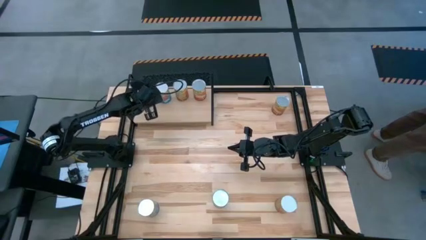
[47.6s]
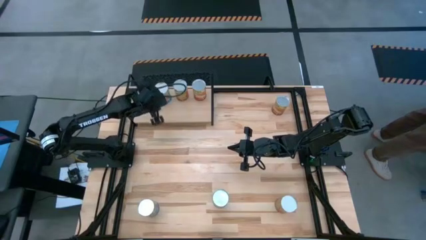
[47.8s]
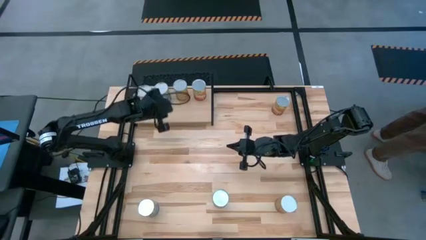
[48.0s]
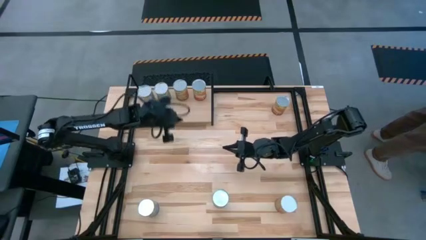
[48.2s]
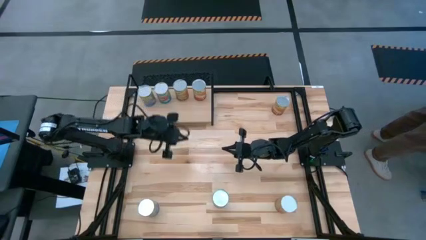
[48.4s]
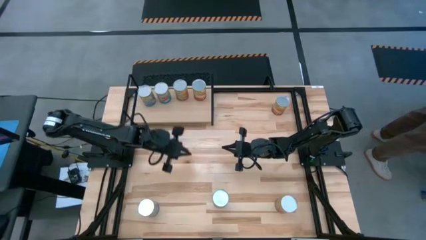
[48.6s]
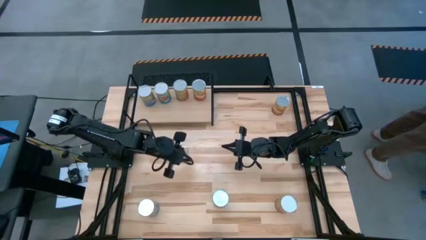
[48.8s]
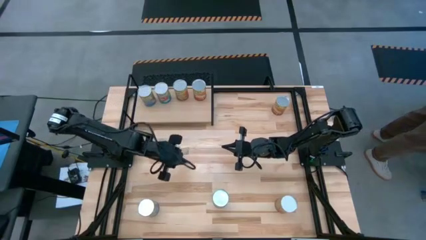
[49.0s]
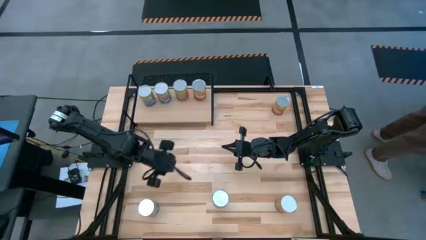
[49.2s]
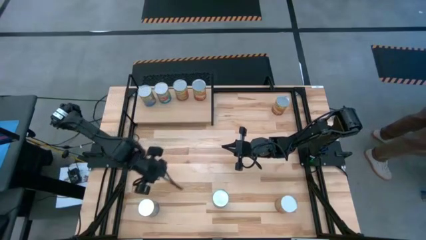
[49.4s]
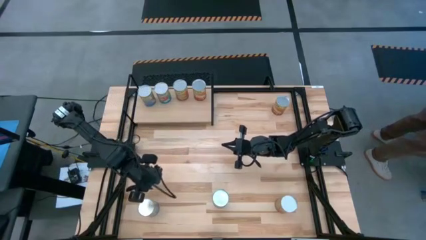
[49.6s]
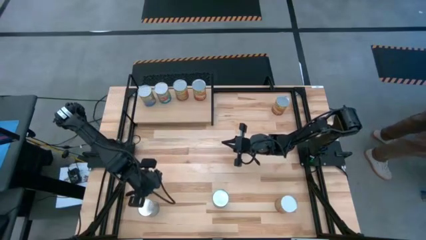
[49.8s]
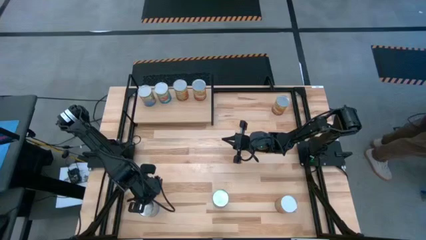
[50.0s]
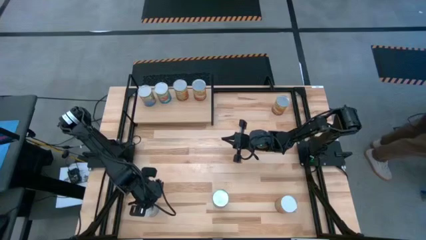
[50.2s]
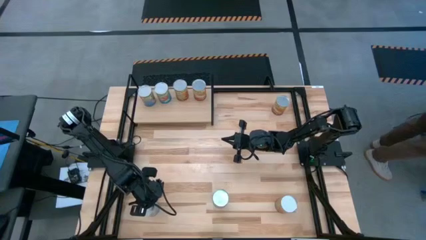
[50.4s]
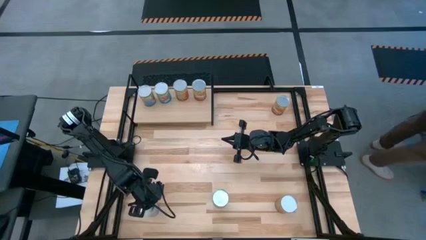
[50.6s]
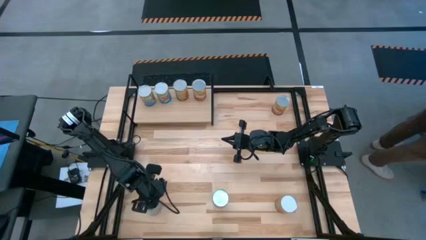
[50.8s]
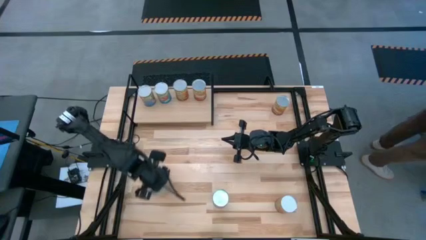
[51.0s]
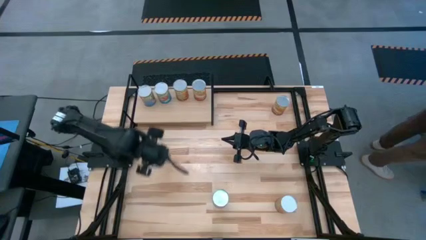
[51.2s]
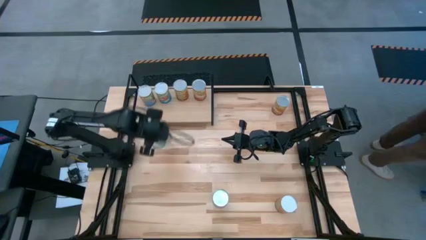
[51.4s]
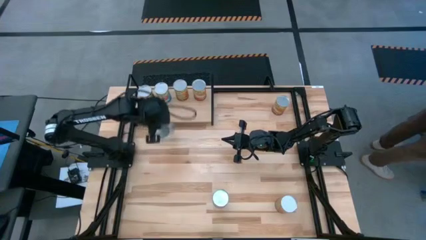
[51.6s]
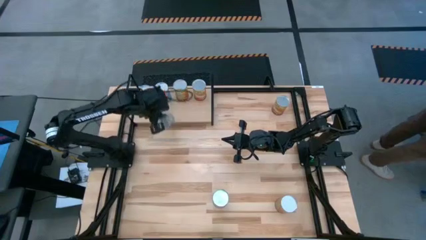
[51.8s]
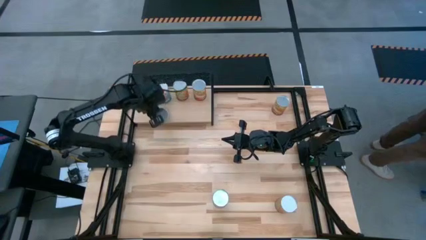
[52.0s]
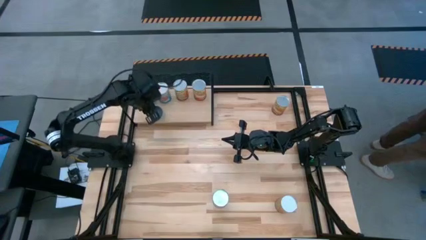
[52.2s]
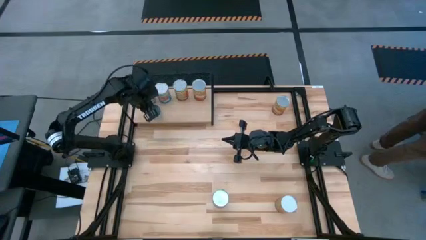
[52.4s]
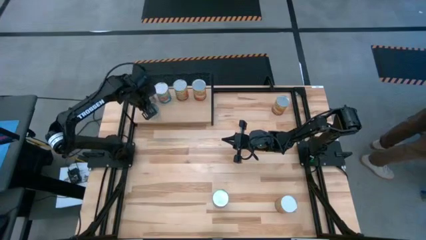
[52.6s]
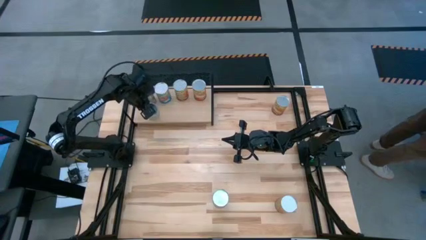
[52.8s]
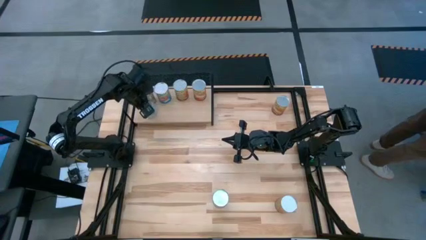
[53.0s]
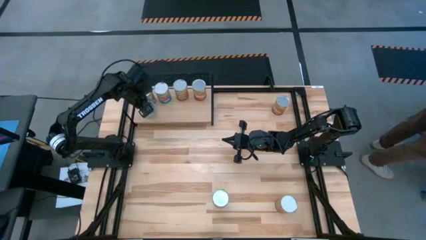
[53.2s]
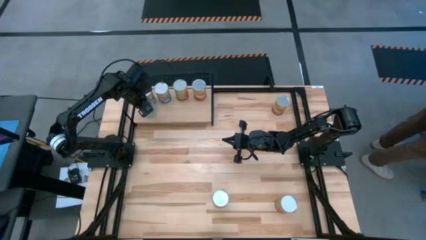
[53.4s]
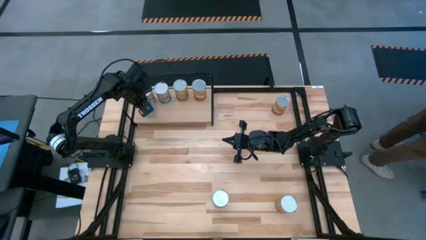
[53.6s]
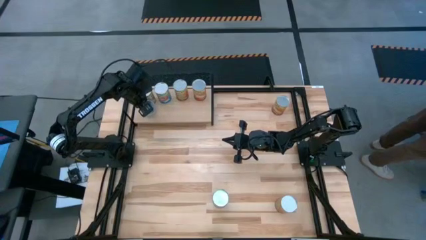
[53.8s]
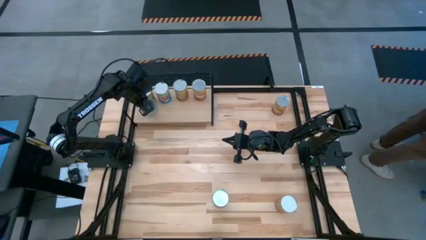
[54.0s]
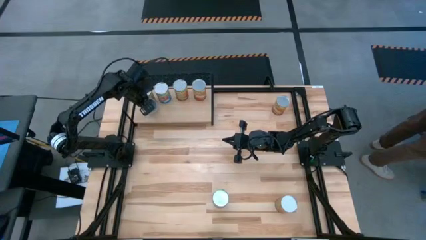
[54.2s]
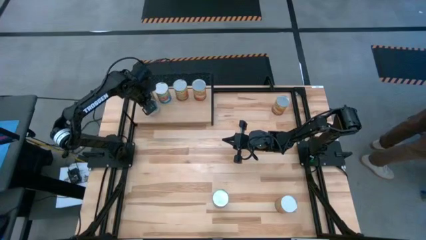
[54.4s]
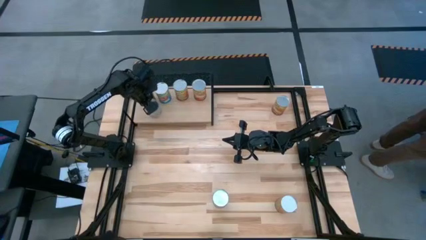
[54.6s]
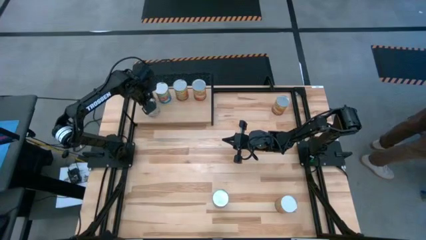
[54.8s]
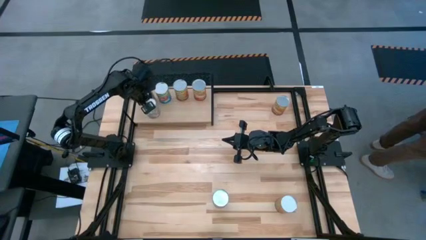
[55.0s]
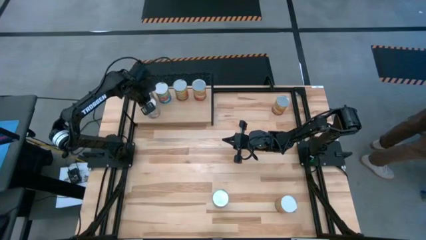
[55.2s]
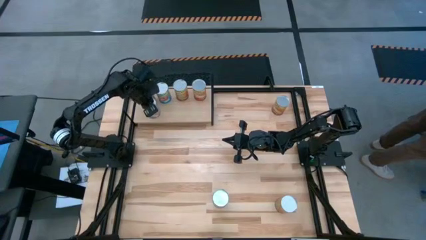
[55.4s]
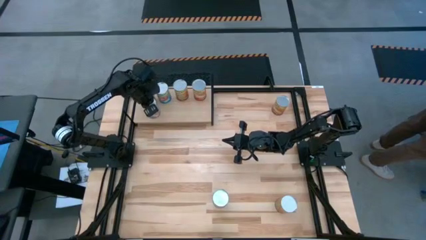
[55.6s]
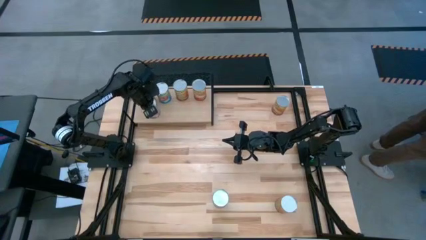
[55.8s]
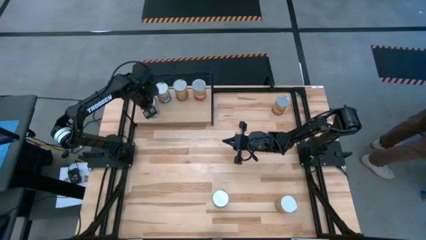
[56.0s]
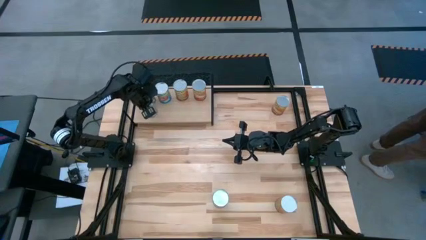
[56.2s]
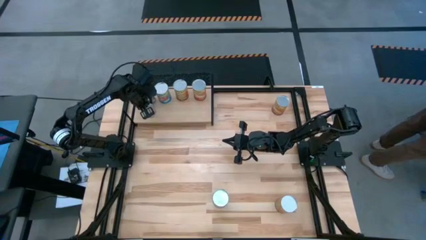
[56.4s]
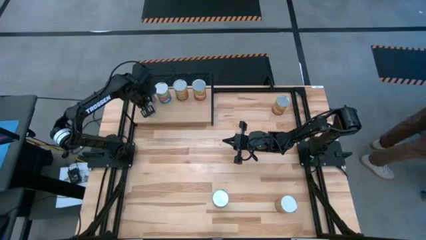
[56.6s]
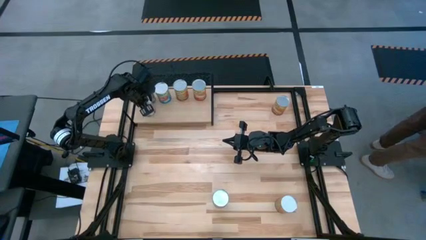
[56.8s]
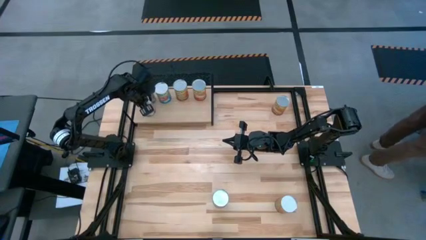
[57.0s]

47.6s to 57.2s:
Task: Pick and place cans onto a shelf
Put the canned peaches on the shelf aligned with the other canned peaches on the shelf

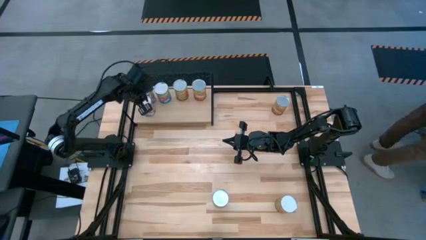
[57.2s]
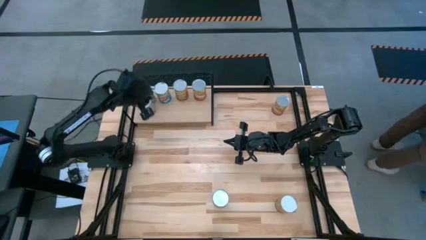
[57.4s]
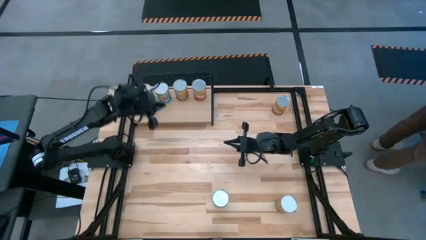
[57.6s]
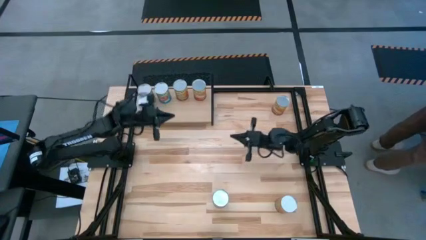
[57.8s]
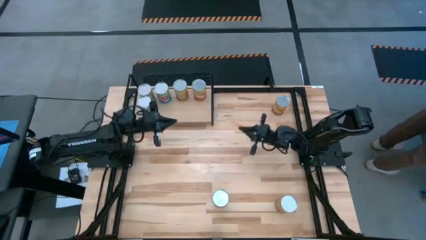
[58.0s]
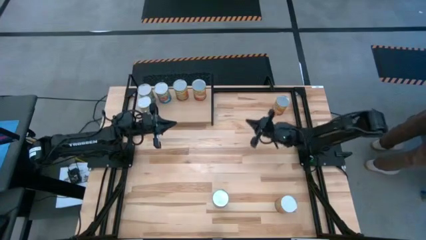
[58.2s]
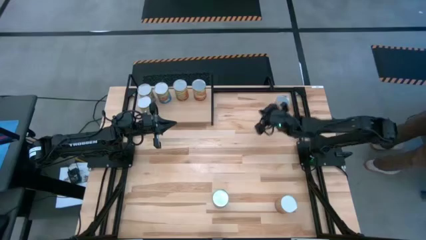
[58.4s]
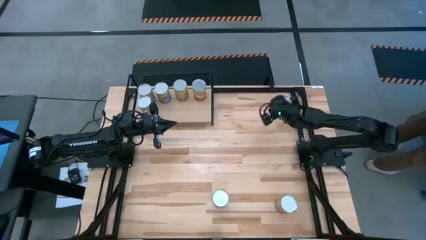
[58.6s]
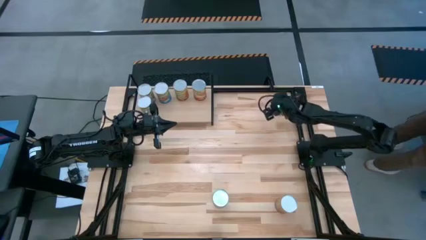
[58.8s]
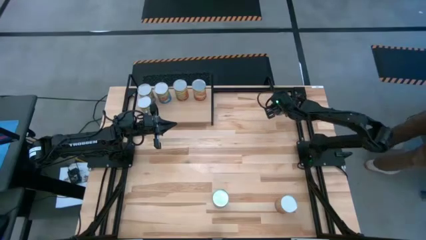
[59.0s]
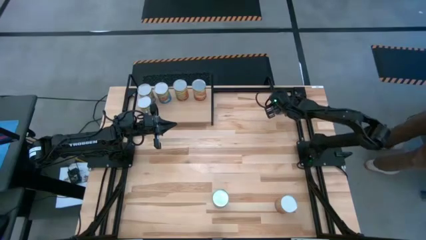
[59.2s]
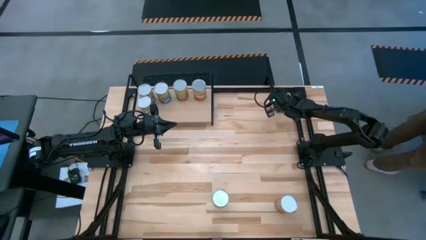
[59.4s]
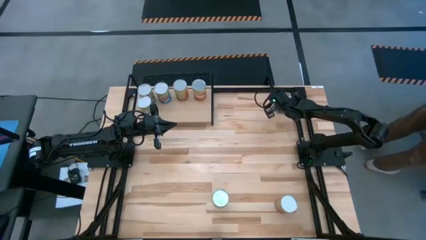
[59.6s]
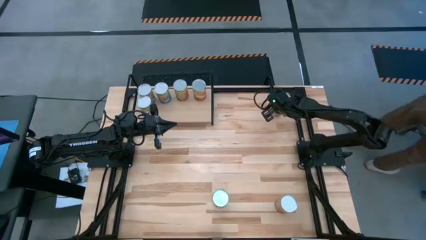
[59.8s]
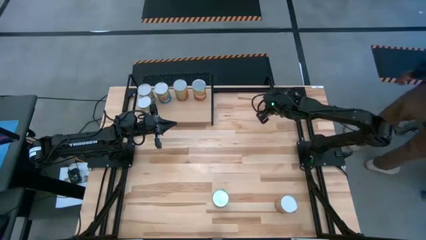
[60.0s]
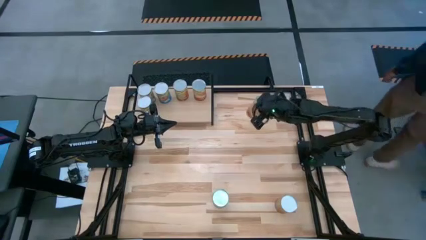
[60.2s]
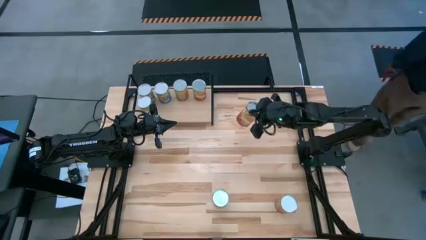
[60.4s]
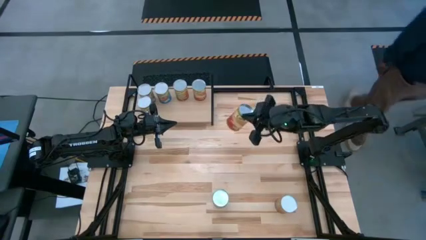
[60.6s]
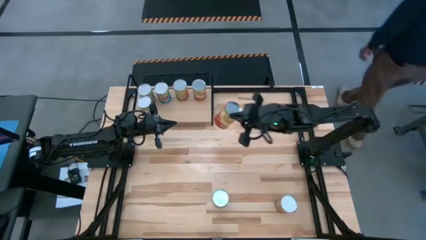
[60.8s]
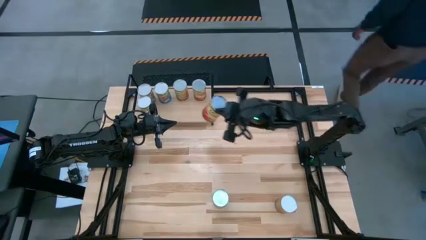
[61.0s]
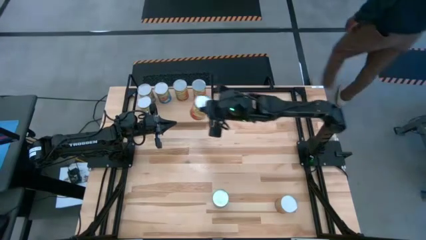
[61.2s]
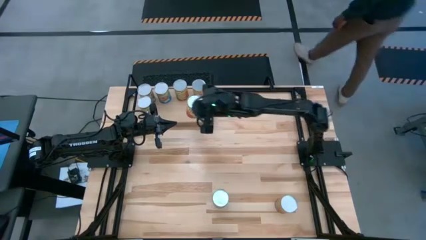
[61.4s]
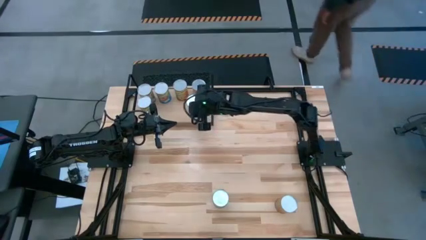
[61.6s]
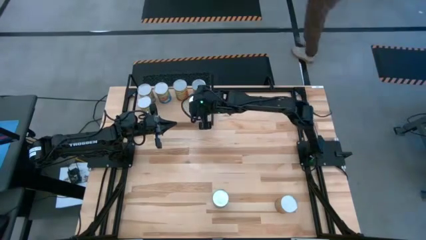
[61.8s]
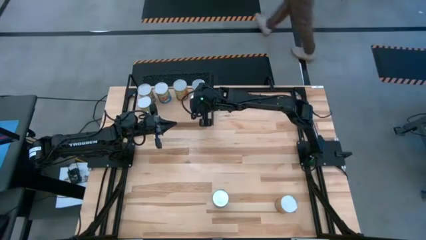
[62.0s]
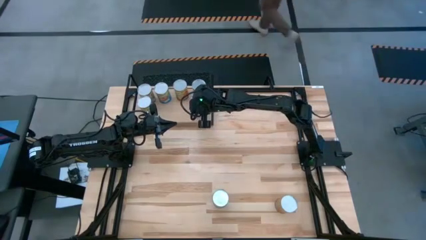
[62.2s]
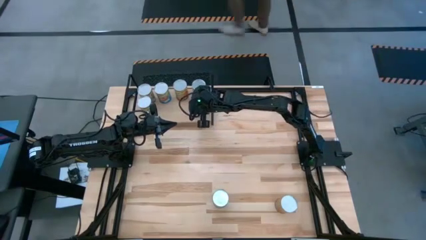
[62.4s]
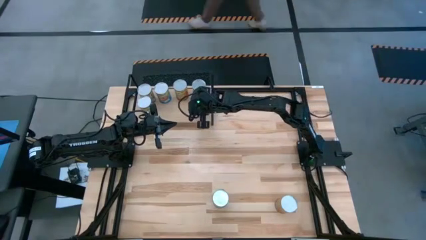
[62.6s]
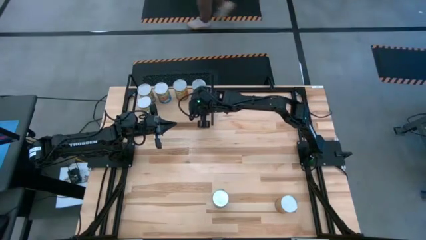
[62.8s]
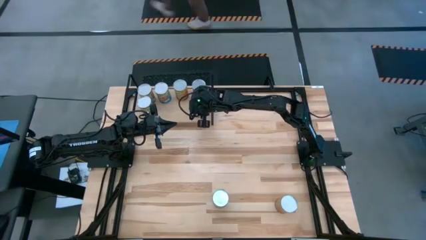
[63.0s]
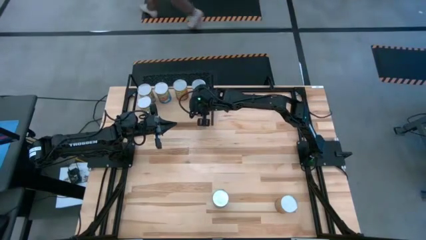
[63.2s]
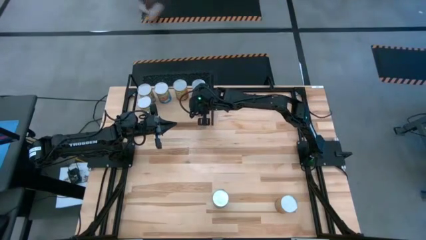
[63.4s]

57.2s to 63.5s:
Put the canned corn on the shelf aligned with the other canned corn on the shelf
